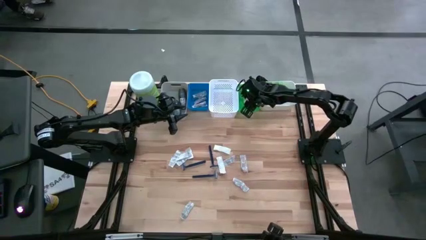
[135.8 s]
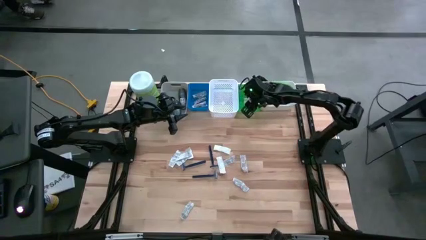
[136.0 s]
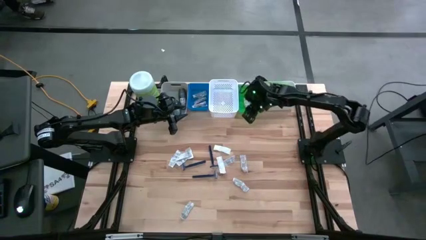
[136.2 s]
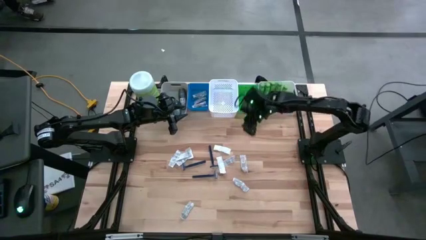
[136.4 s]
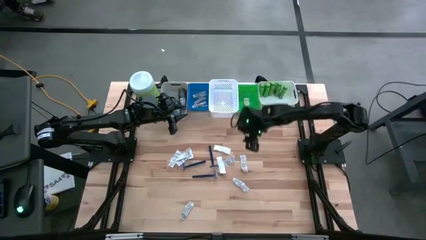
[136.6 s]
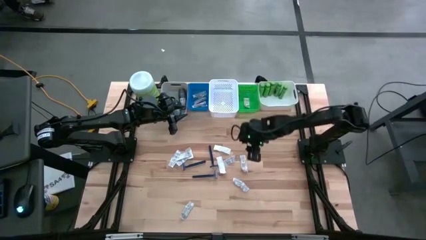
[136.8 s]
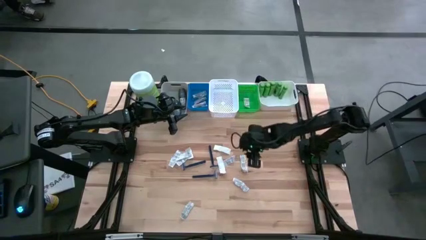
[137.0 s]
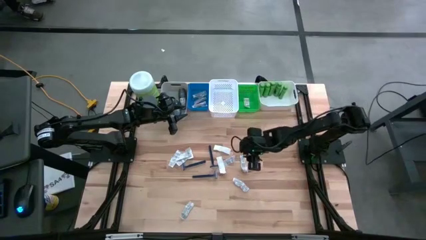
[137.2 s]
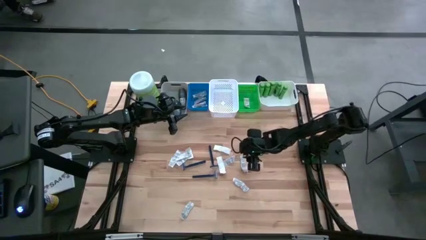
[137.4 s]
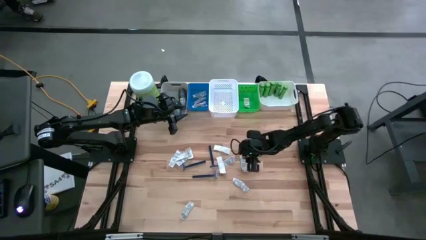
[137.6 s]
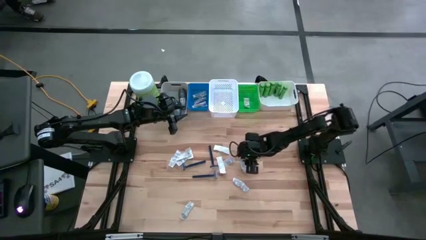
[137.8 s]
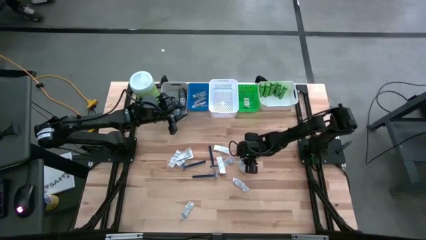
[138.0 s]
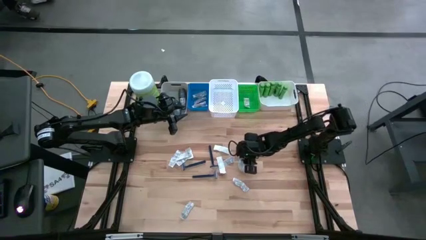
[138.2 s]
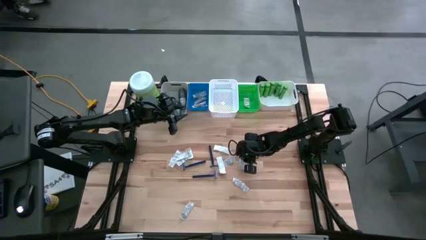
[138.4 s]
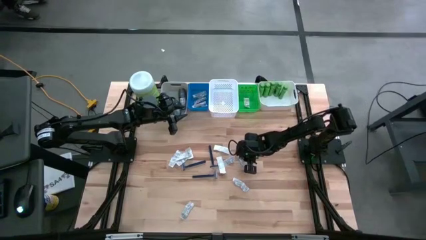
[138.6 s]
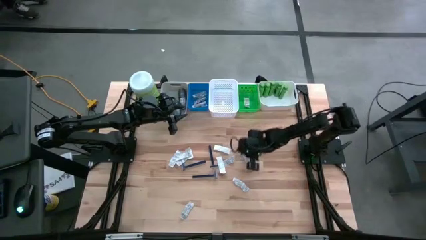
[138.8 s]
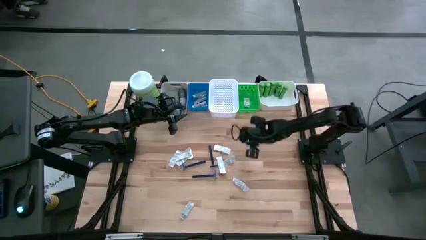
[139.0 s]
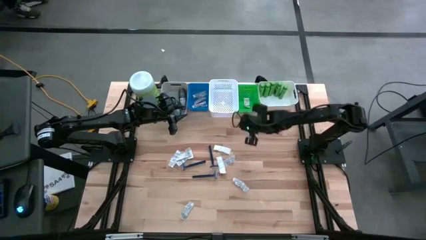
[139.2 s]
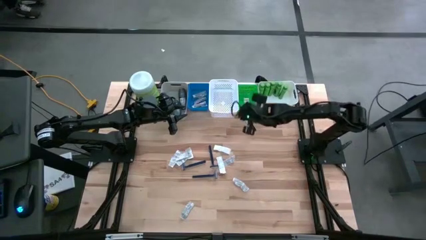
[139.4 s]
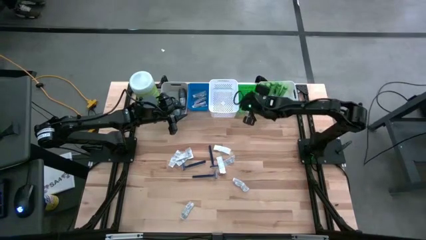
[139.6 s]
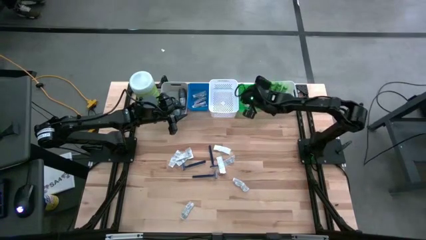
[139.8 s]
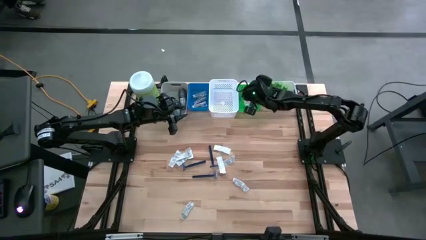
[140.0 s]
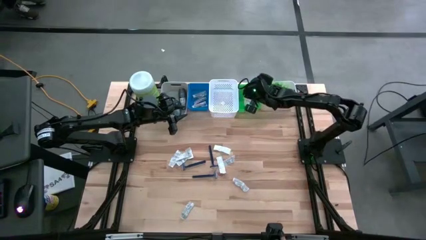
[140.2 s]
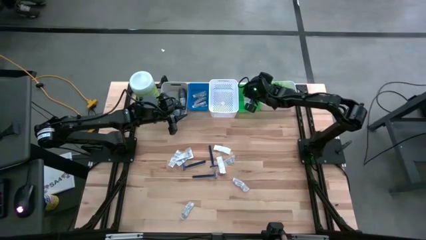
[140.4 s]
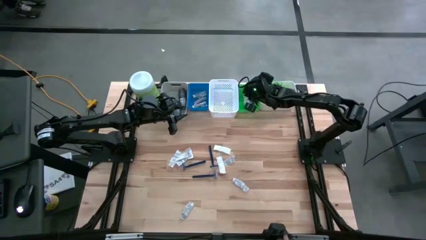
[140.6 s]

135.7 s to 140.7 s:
Task: Pick & Place Travel size toiletries
Put the white bandage pack into the green bin

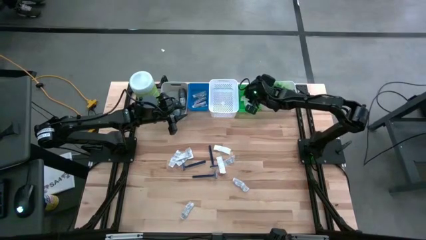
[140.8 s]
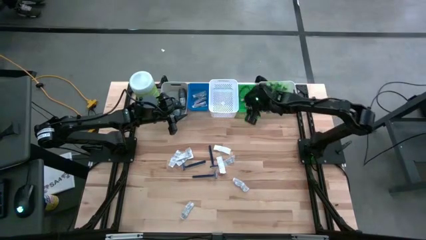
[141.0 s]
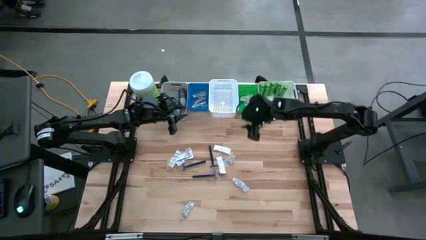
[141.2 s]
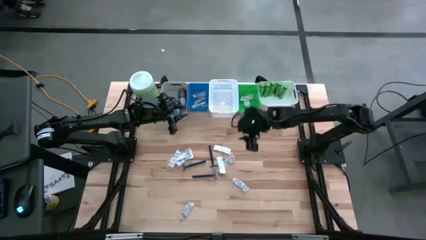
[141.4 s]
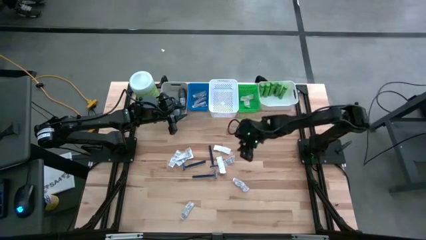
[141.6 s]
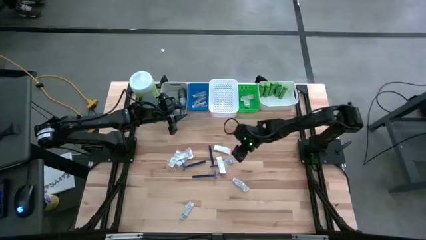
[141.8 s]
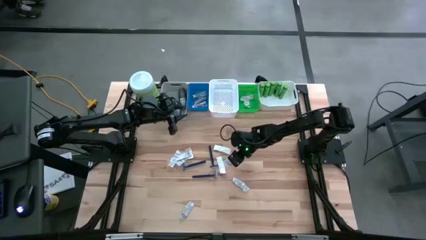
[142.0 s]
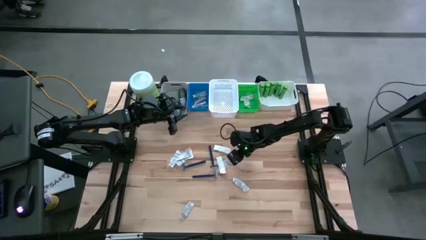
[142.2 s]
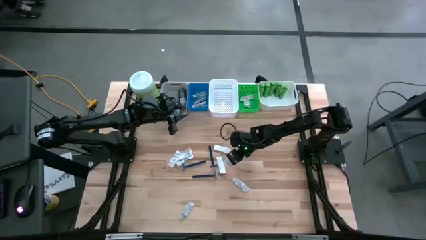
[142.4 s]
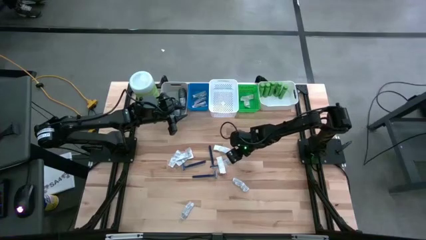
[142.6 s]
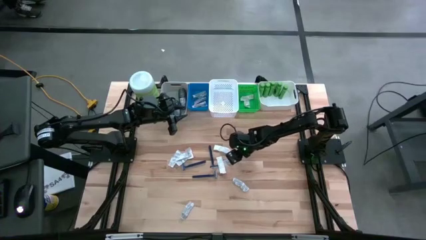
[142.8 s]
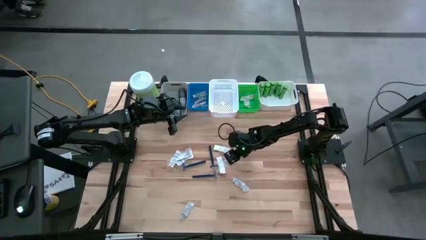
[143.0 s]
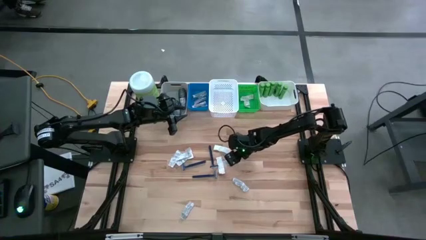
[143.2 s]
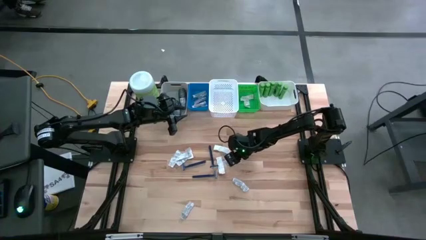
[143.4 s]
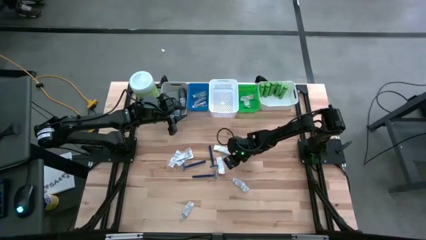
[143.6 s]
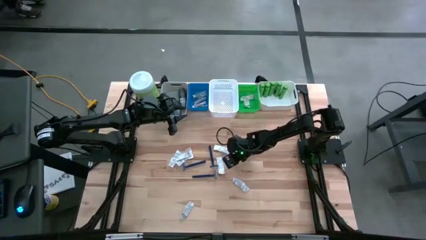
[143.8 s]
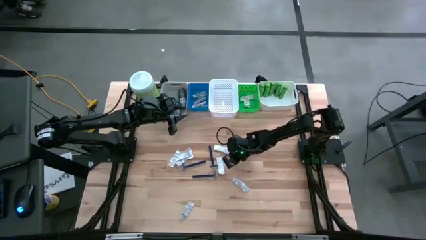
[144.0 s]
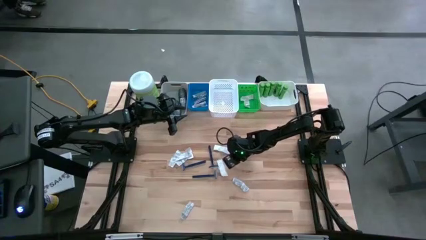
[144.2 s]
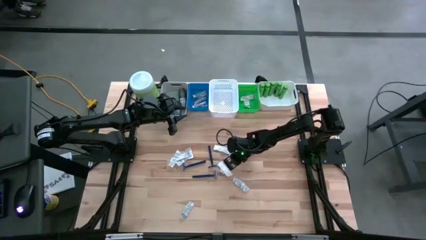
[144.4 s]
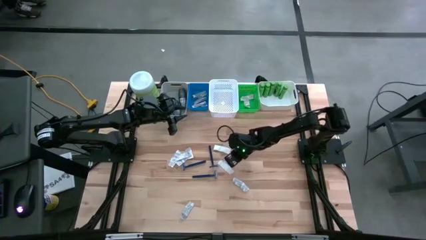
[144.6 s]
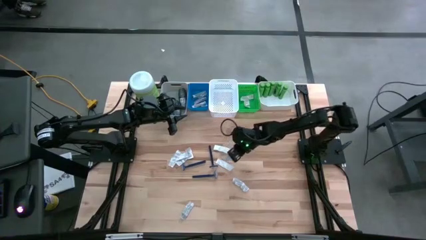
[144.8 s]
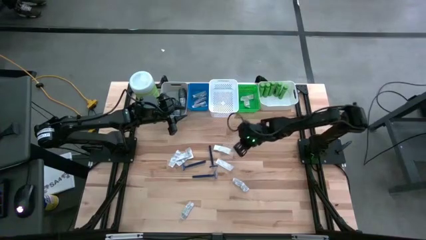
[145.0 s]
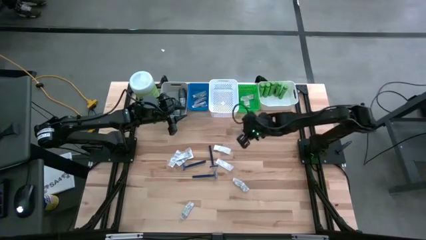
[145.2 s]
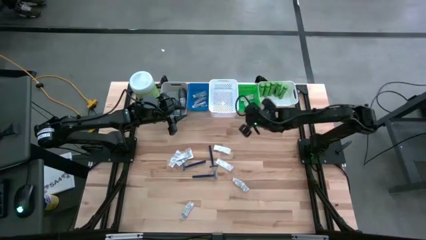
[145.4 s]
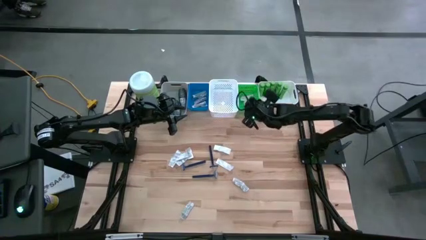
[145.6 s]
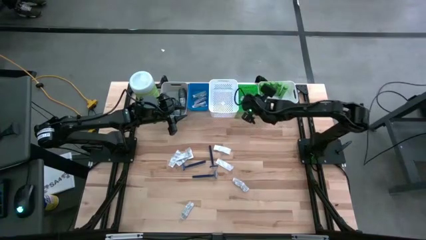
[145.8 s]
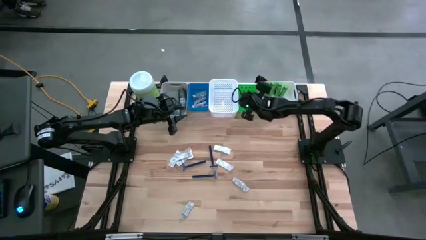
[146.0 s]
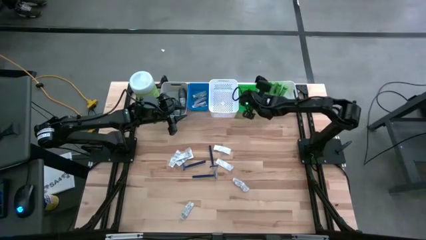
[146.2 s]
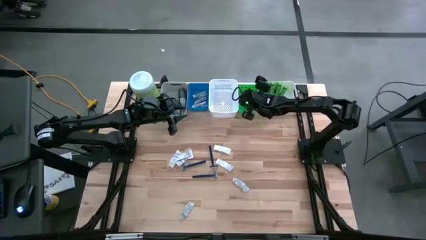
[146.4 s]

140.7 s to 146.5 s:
Put the white bandage pack into the green bin

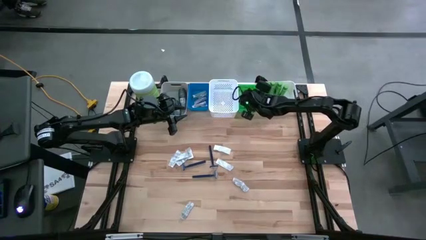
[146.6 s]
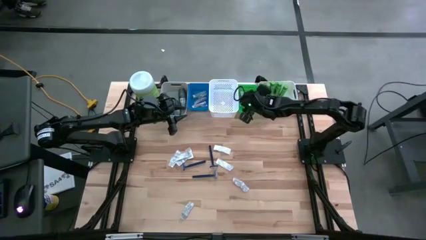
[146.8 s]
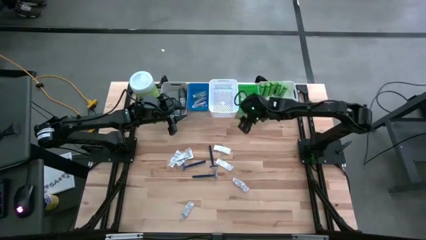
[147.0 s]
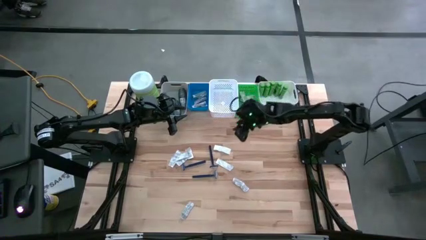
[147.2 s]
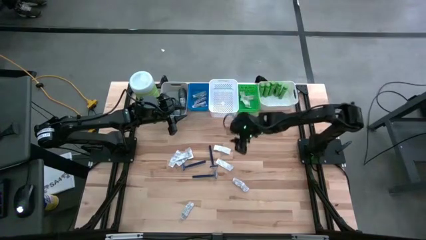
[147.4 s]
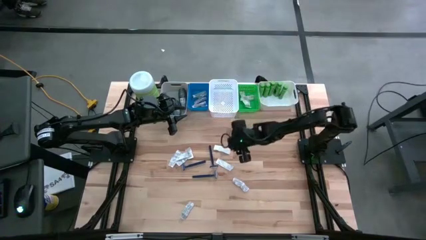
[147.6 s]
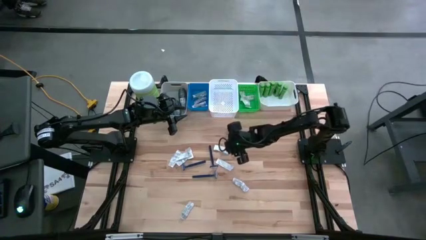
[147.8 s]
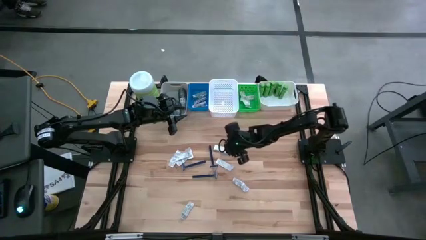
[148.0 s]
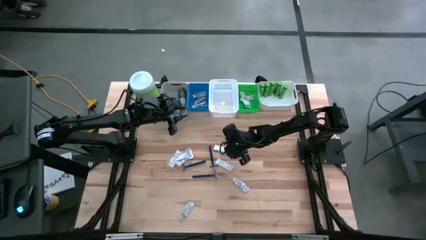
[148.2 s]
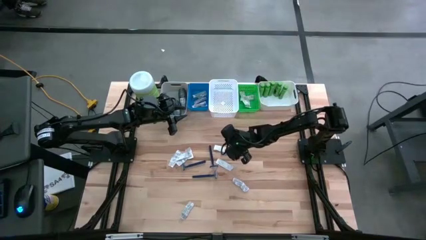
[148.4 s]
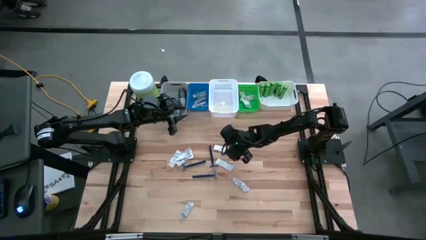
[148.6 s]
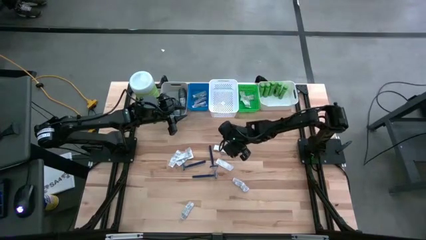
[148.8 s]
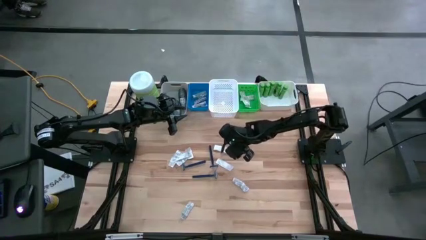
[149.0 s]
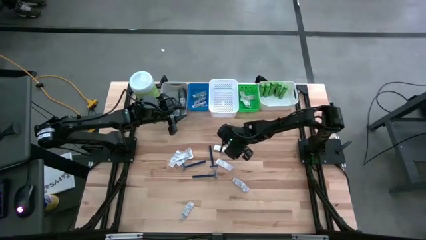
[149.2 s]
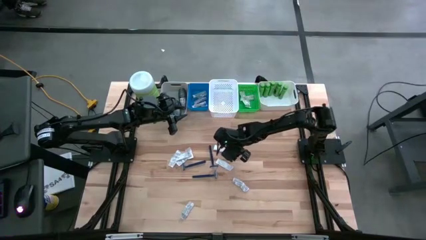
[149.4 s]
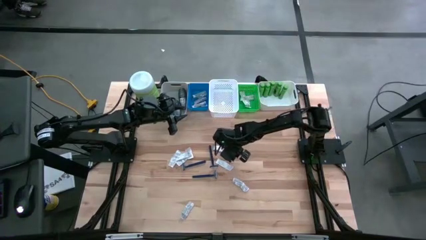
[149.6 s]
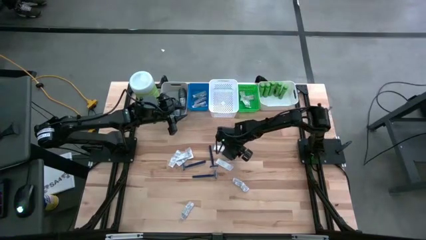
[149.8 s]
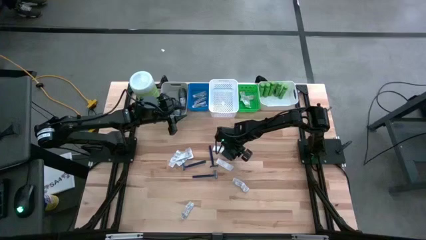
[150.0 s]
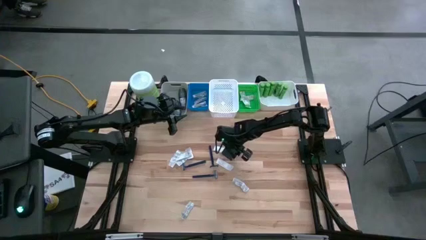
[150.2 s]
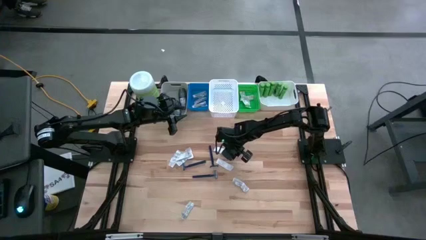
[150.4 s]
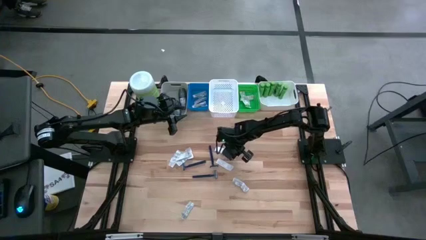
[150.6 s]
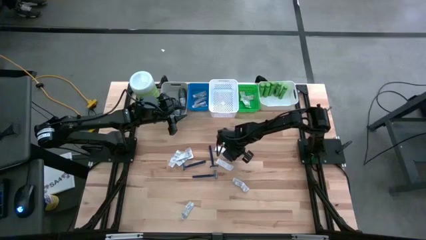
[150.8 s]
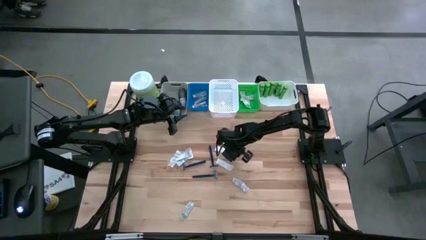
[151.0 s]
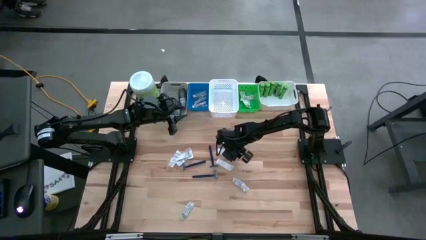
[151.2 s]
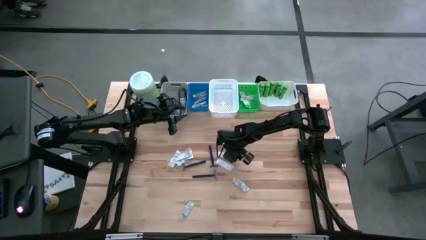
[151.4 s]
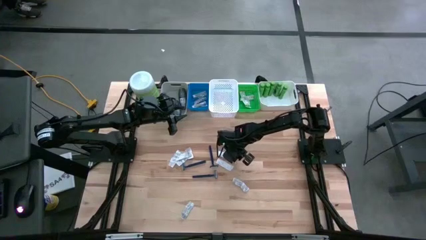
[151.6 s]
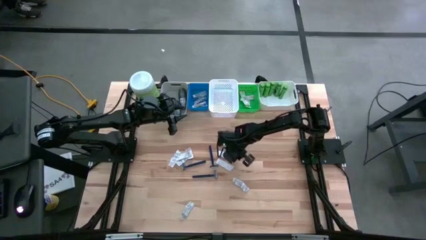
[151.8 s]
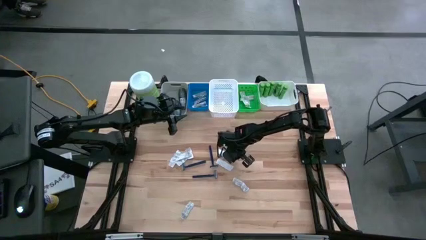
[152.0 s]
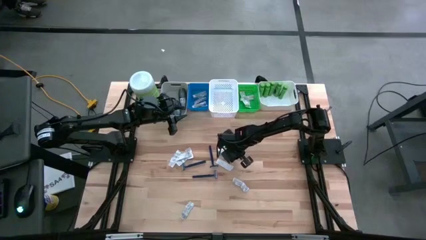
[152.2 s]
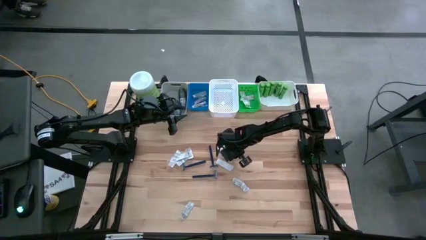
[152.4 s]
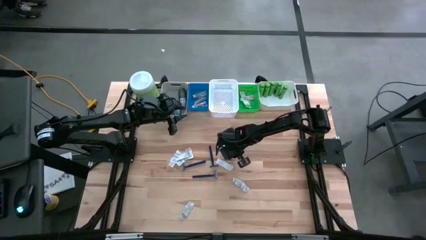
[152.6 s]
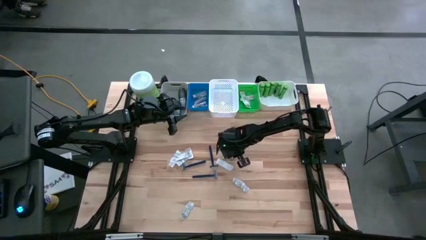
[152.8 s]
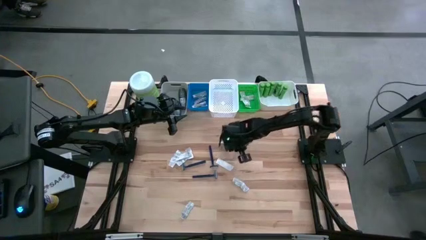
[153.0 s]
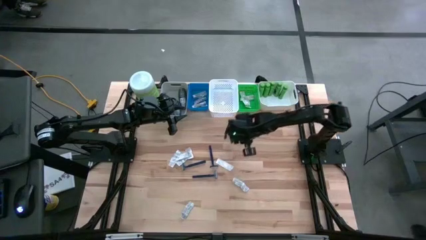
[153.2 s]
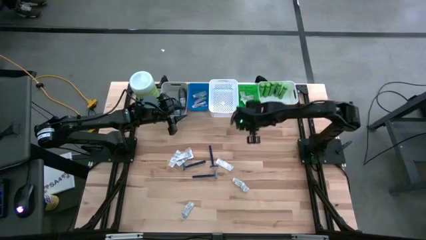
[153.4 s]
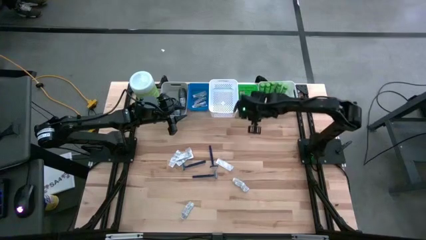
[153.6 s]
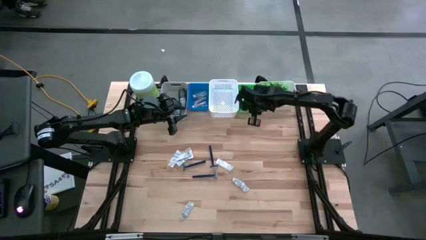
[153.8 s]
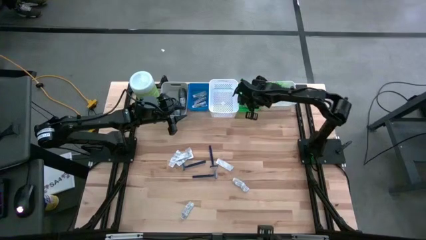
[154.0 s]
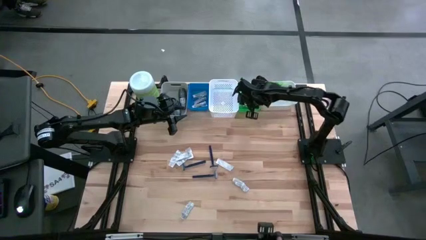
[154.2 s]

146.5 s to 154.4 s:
Put the white bandage pack into the green bin
